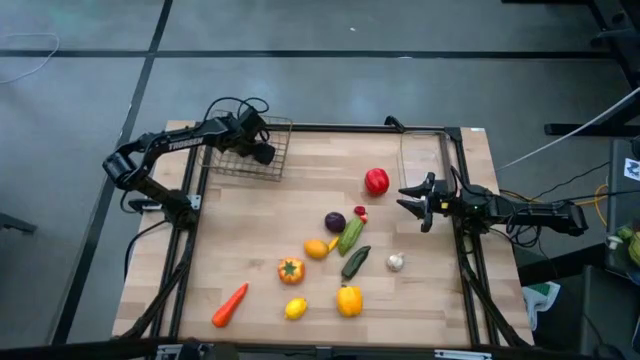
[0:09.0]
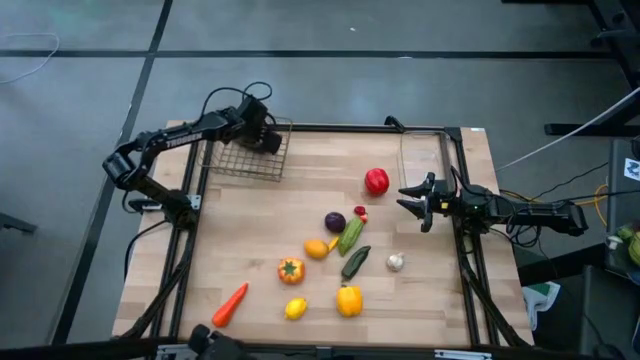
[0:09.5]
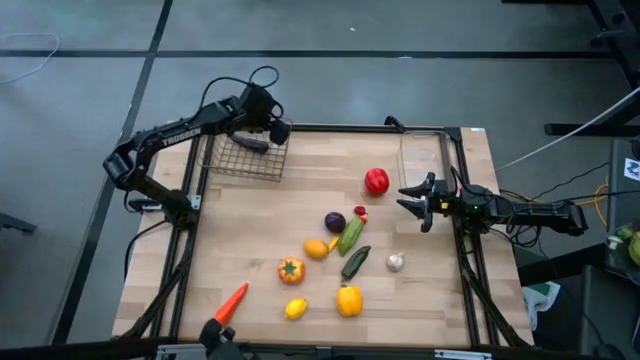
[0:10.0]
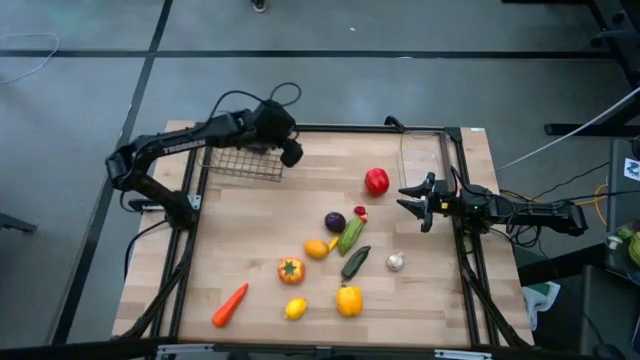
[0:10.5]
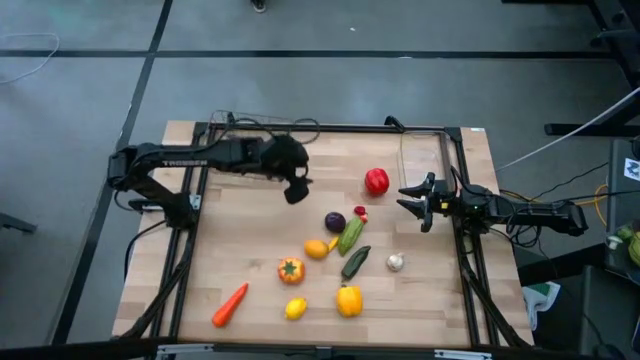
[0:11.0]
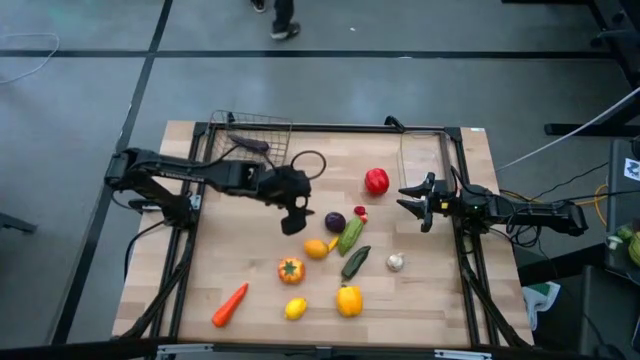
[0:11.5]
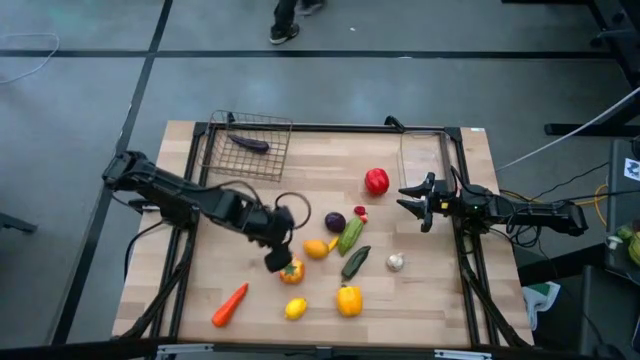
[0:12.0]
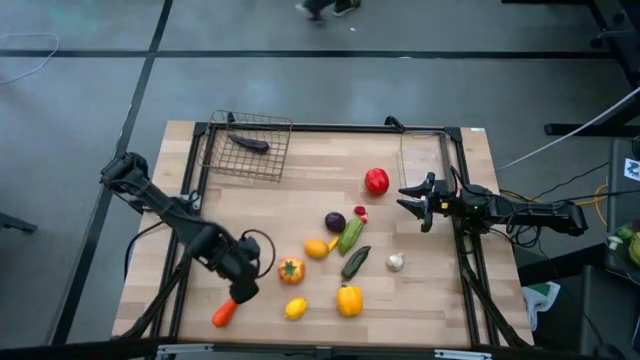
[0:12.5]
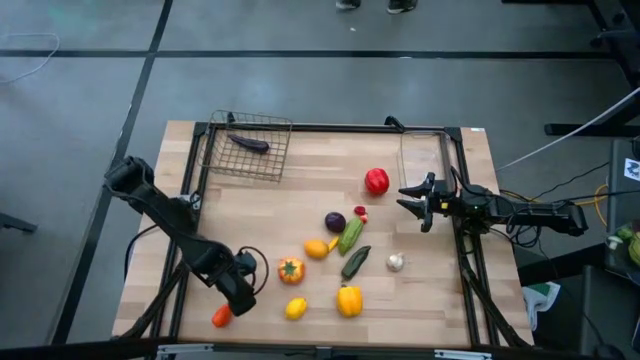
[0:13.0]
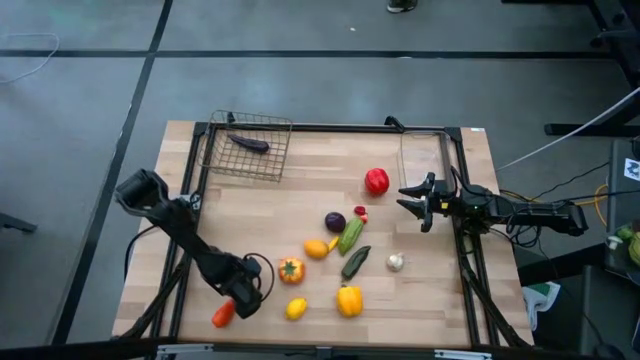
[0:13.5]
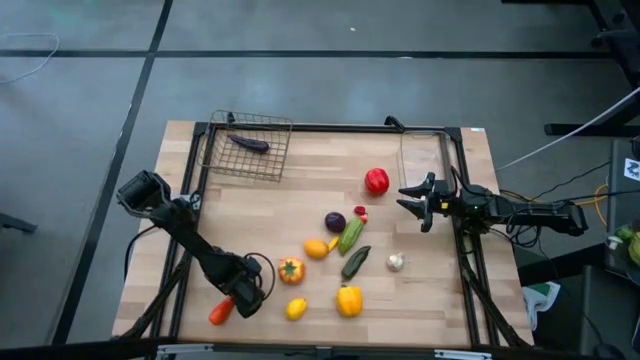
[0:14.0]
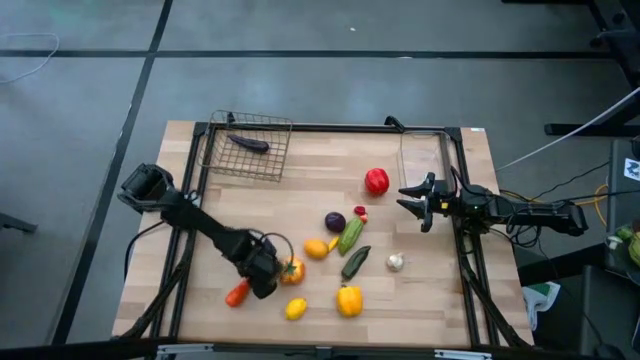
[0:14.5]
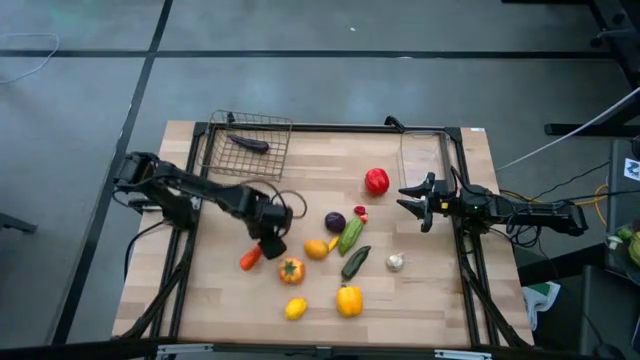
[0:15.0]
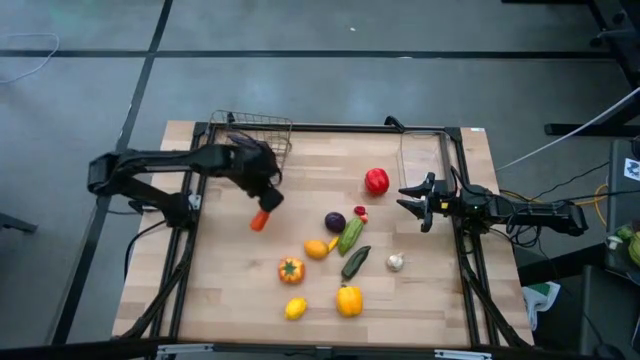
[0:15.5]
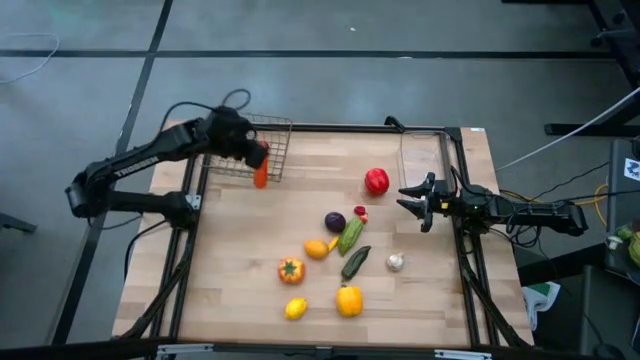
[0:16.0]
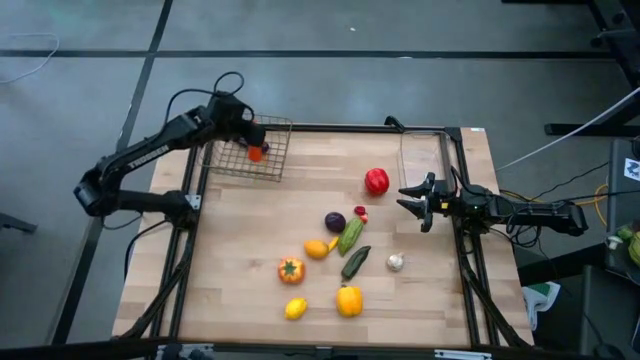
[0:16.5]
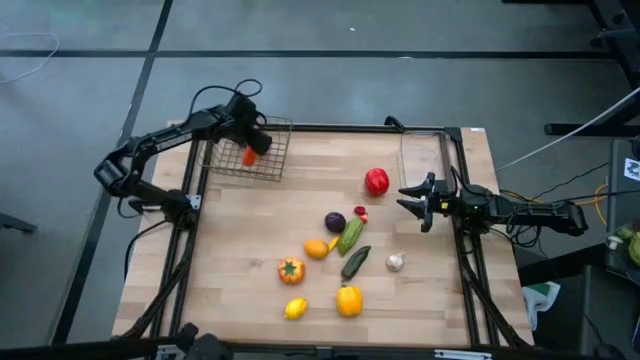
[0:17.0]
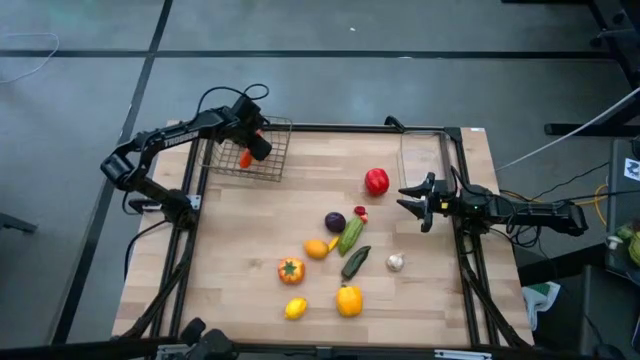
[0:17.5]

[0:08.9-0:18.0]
Task: Sort produce into baskets
Put the orange carrot into the silver wire basket

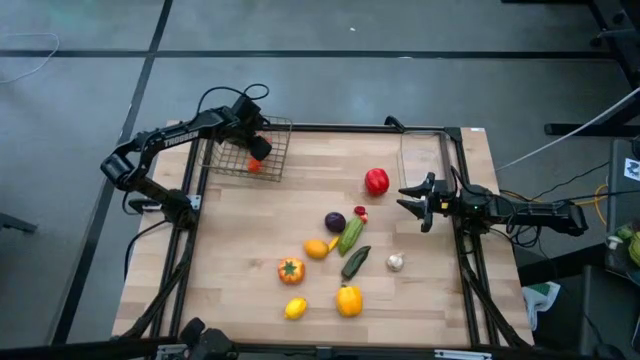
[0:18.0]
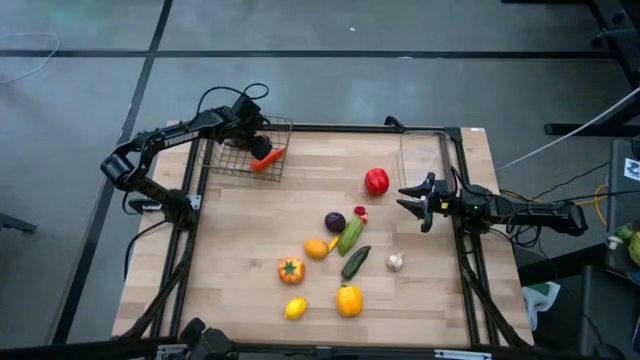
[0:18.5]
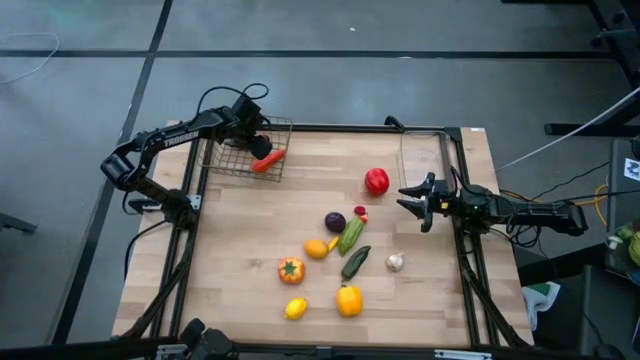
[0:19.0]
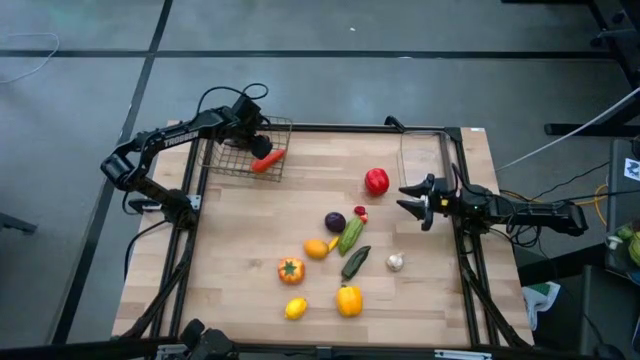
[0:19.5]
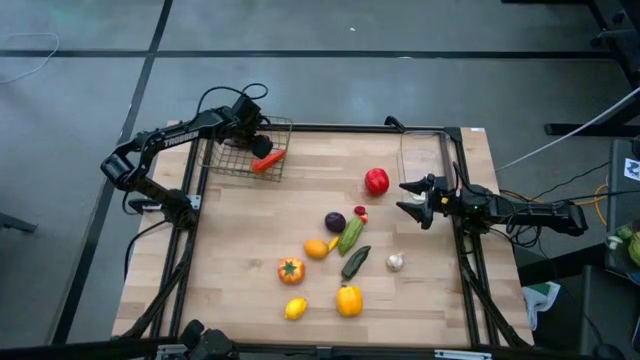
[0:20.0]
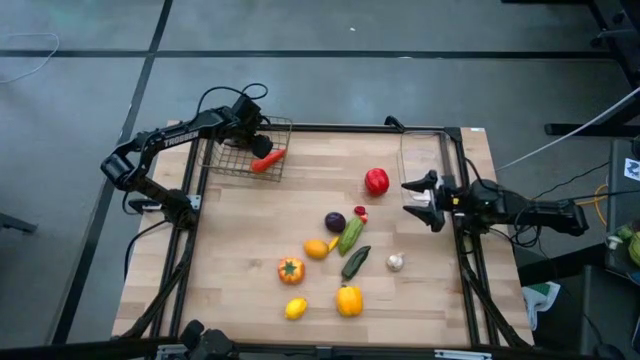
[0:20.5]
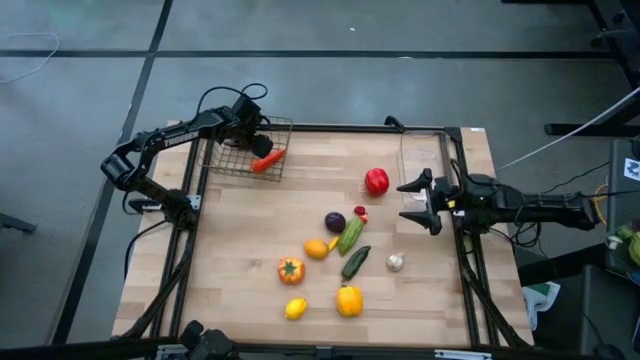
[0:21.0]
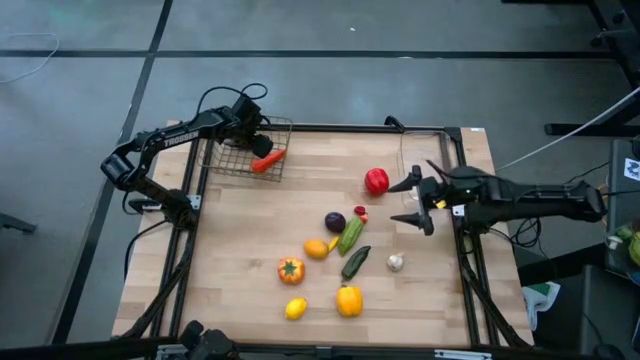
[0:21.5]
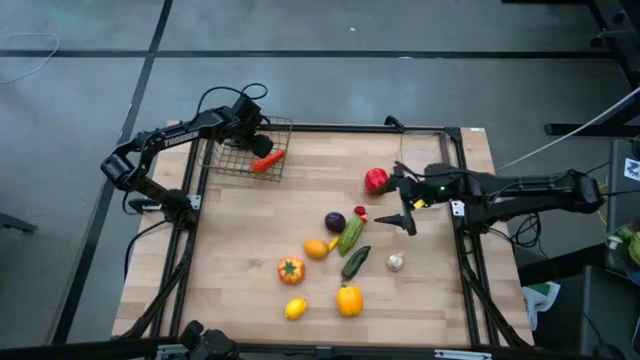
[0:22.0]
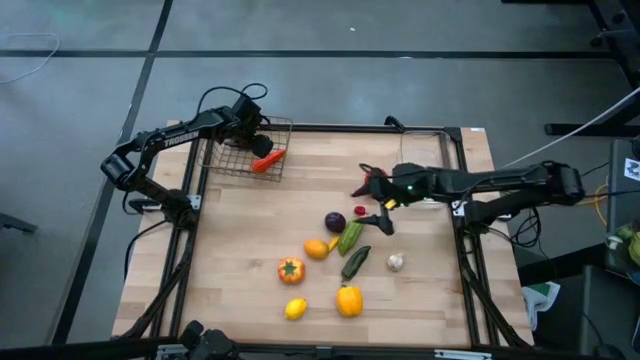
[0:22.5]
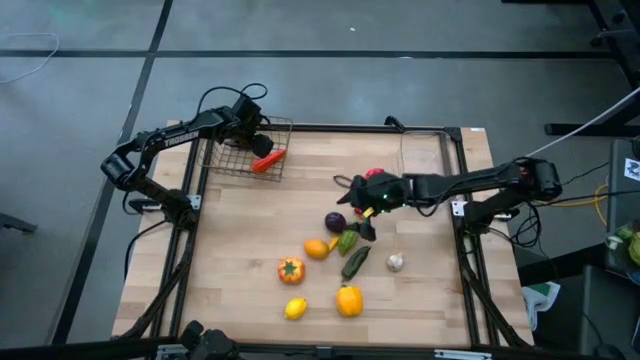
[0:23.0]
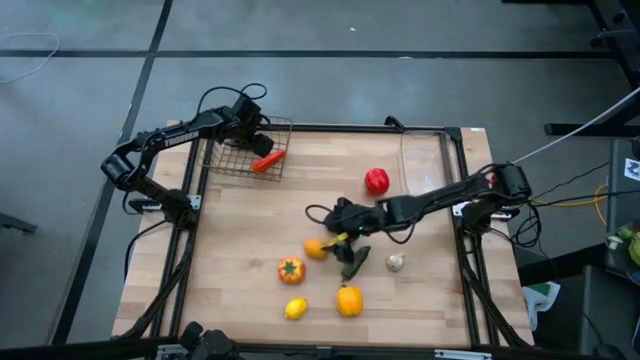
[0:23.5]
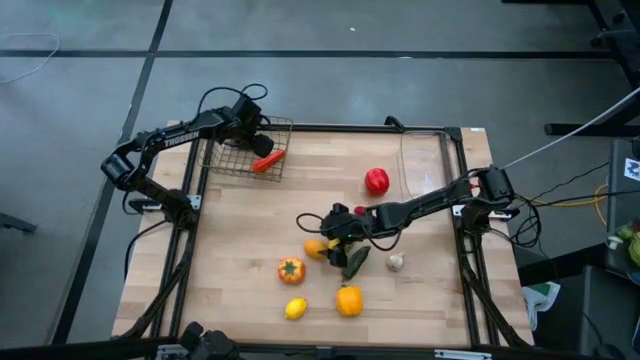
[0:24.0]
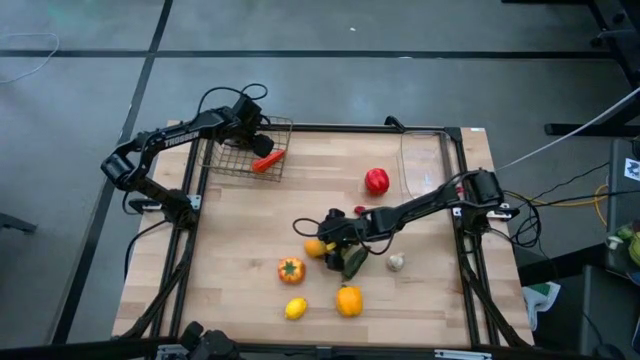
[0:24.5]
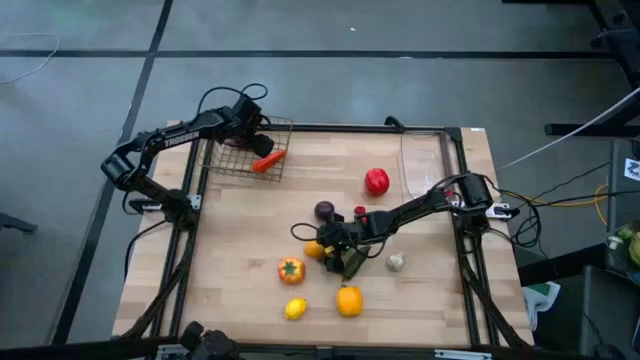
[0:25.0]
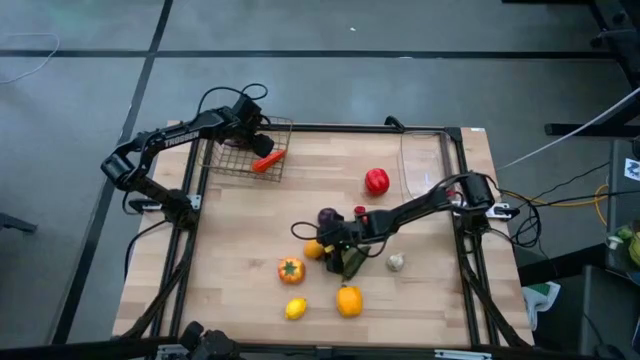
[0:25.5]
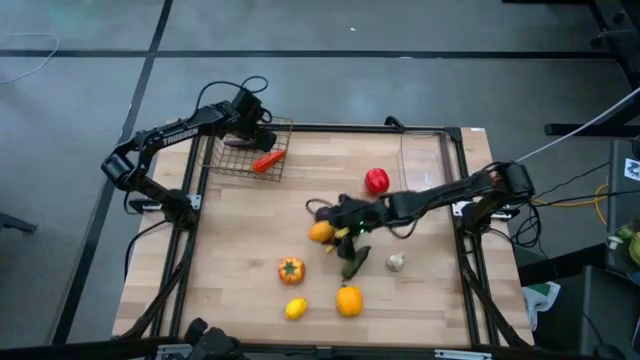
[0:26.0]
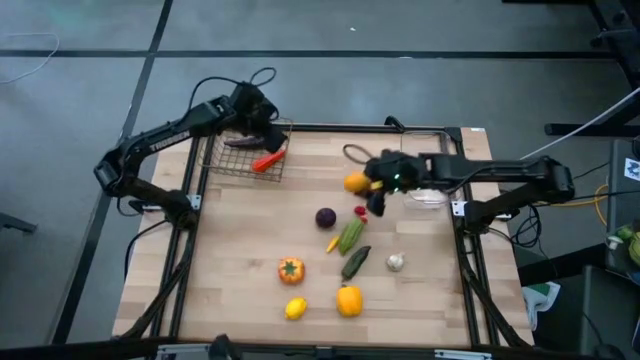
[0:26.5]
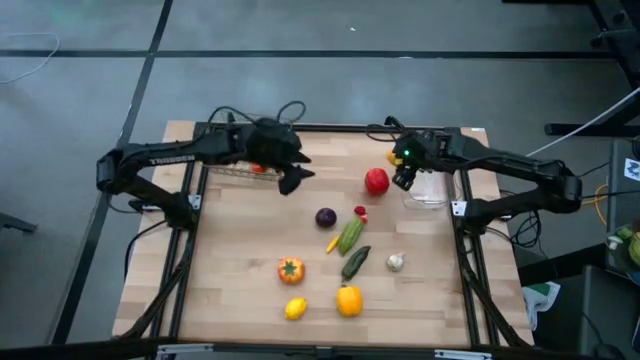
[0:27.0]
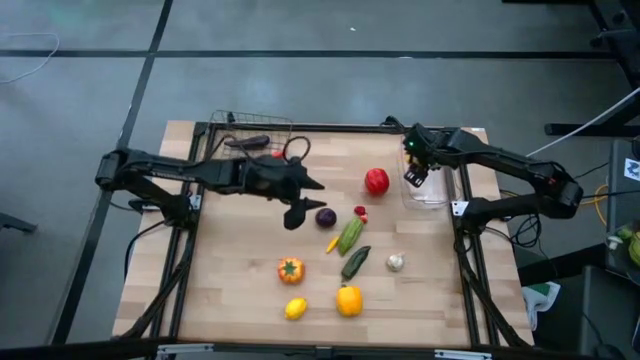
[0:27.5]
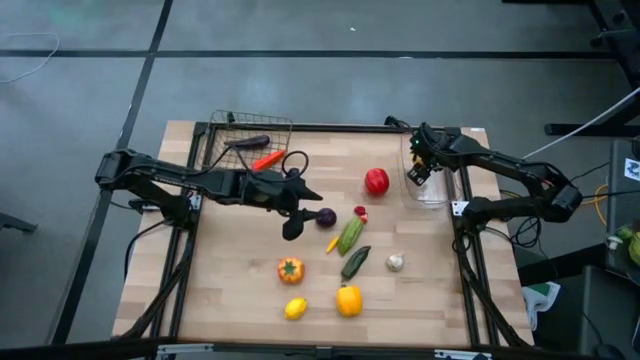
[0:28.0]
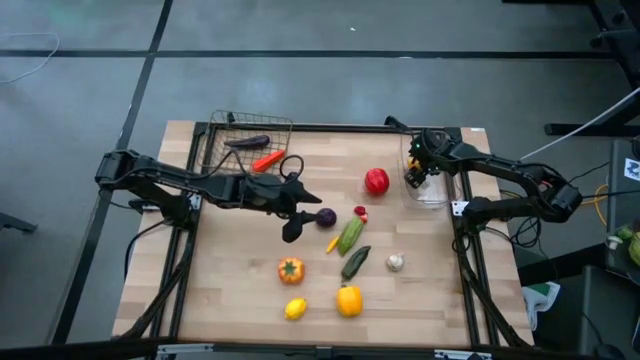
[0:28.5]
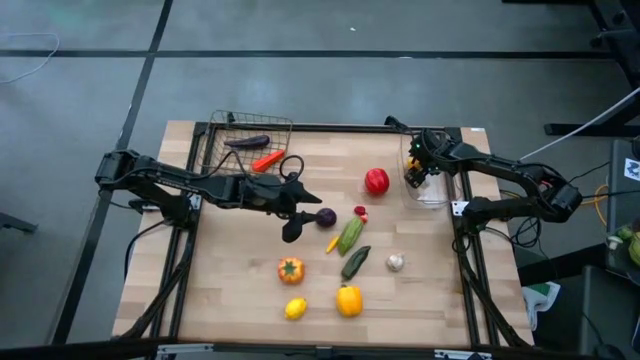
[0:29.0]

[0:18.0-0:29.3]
Put the top yellow lemon into the transparent bin

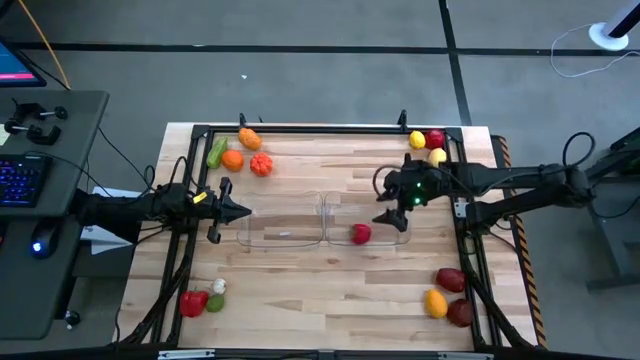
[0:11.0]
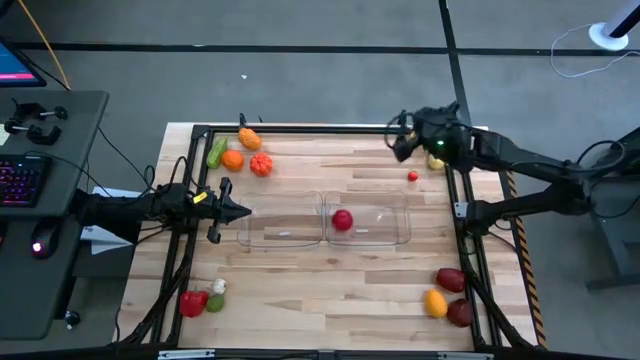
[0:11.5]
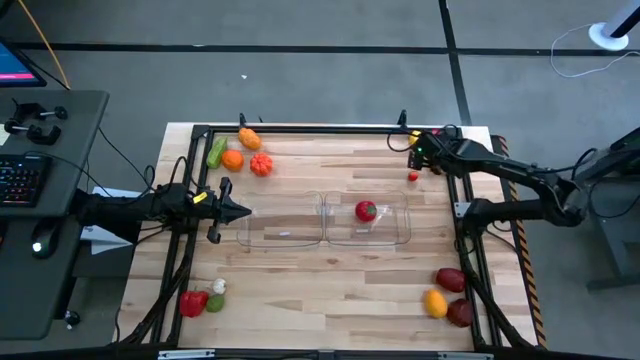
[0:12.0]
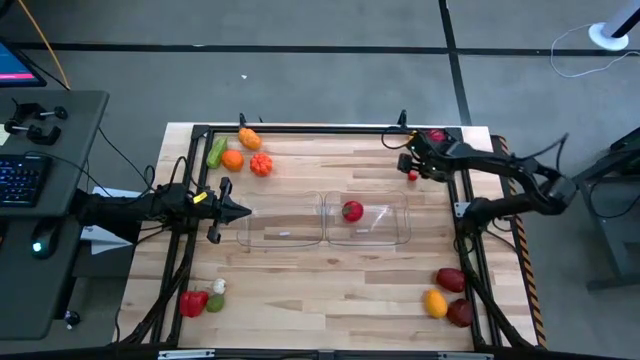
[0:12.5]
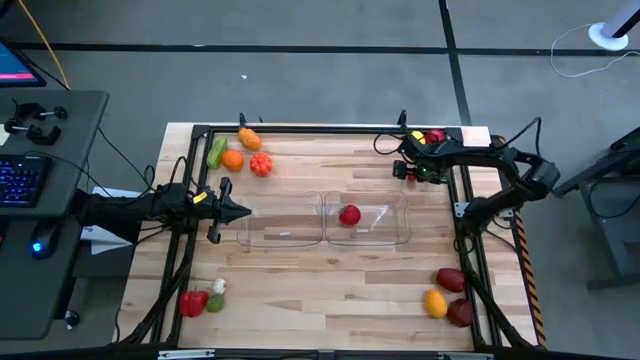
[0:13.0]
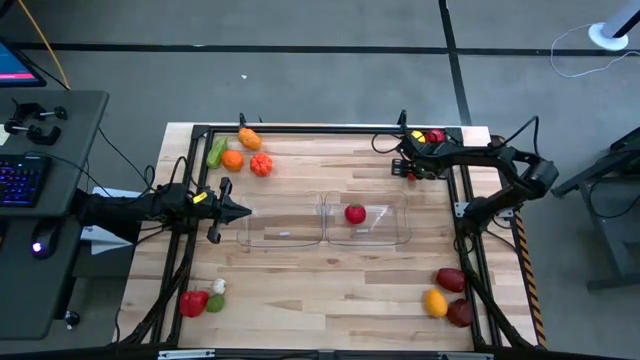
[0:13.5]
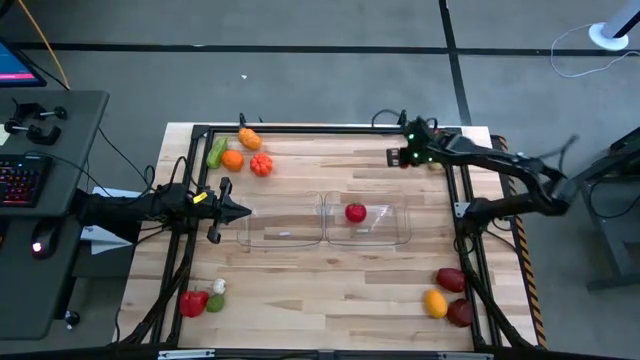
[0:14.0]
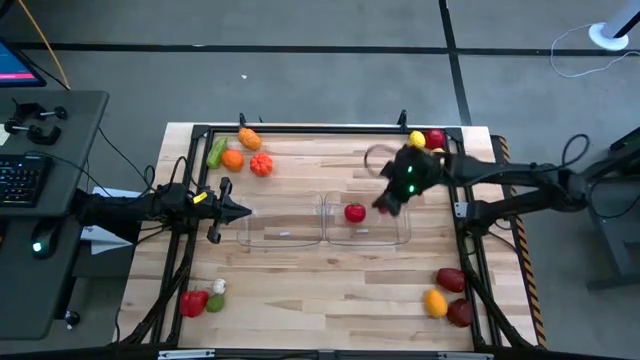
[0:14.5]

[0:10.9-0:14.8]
Task: Sort produce into baskets
Put the red peach into the right transparent bin
